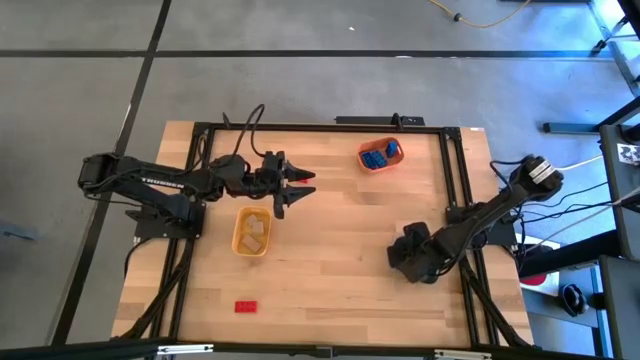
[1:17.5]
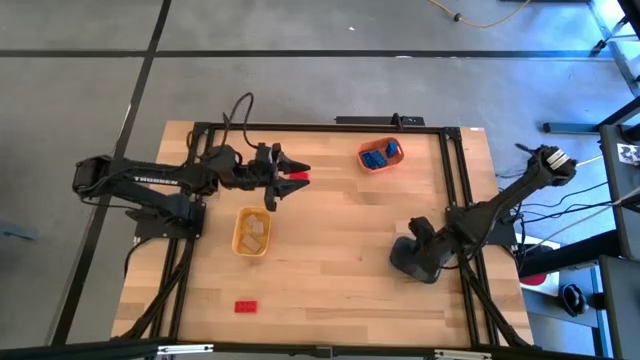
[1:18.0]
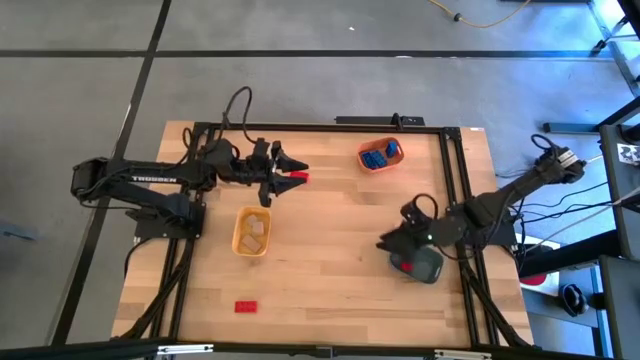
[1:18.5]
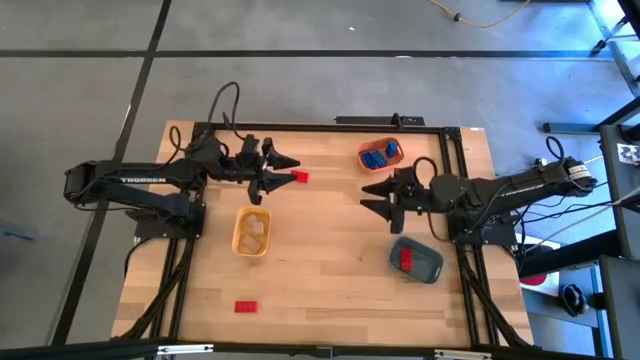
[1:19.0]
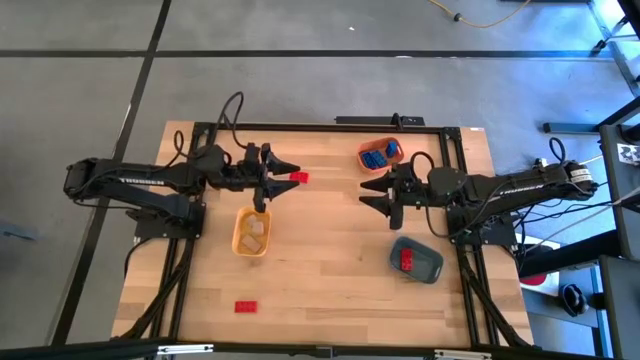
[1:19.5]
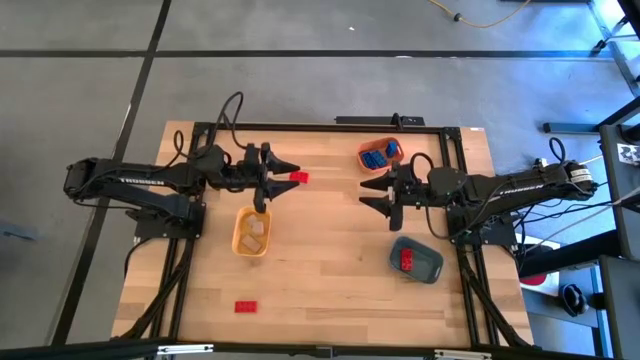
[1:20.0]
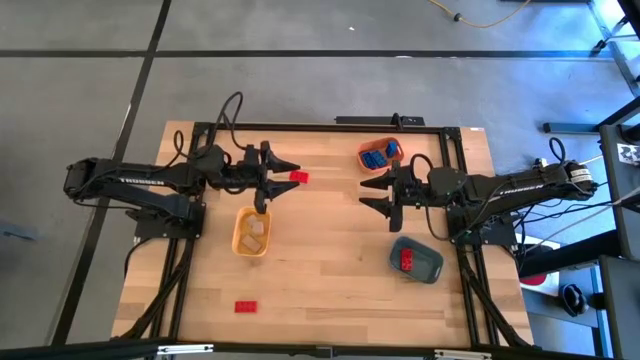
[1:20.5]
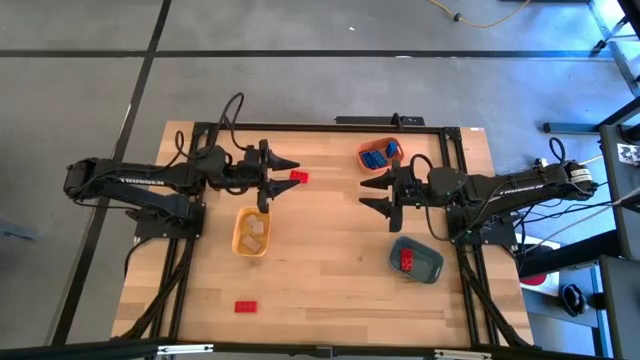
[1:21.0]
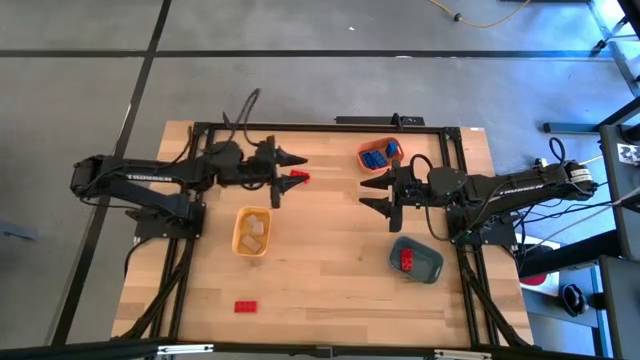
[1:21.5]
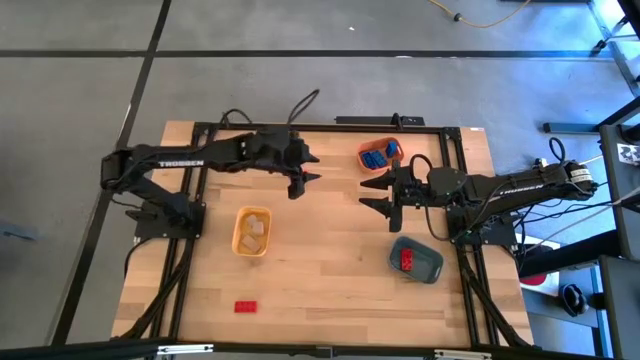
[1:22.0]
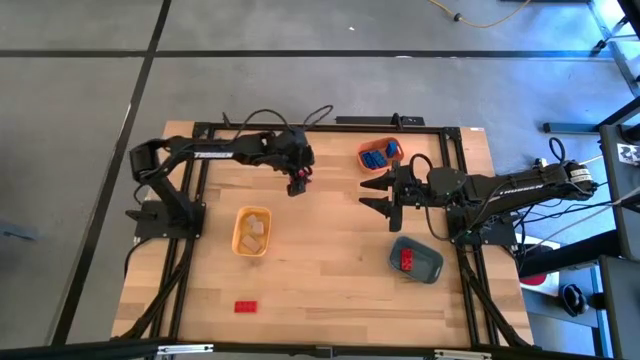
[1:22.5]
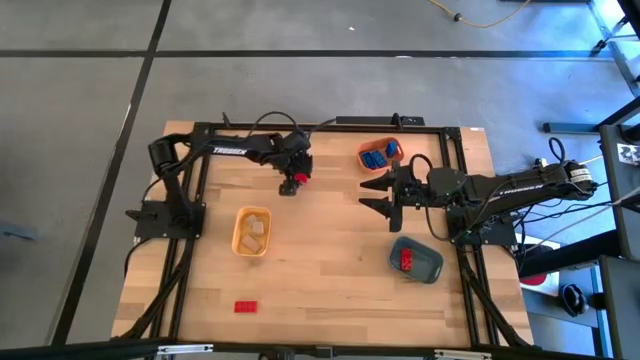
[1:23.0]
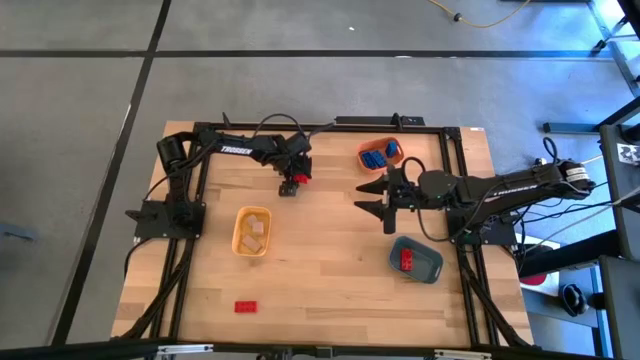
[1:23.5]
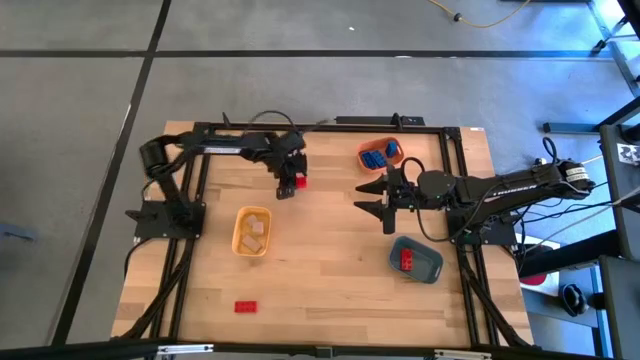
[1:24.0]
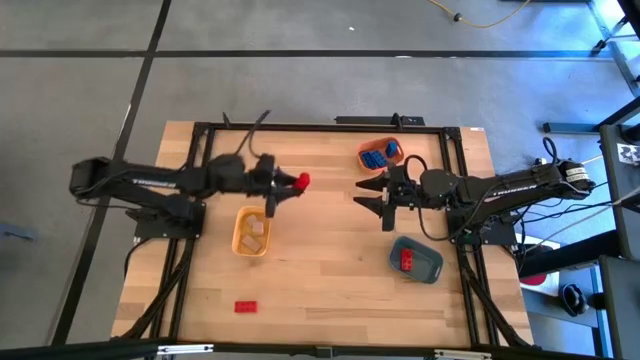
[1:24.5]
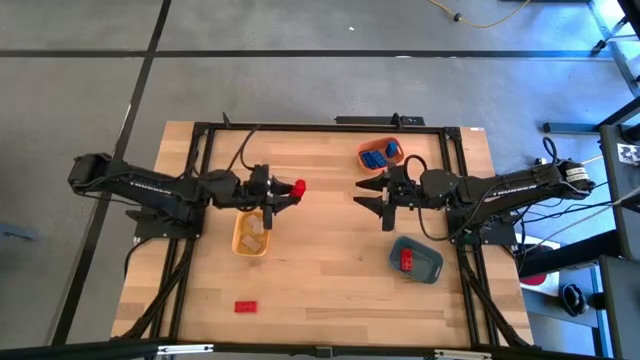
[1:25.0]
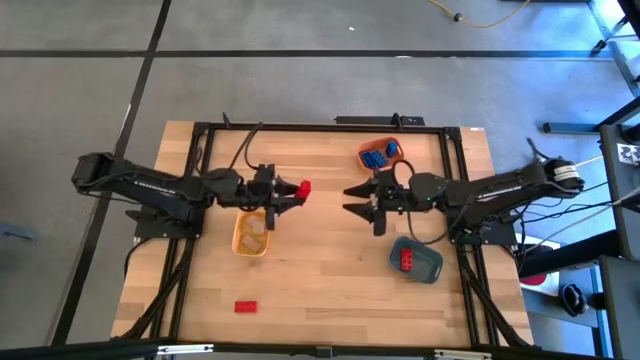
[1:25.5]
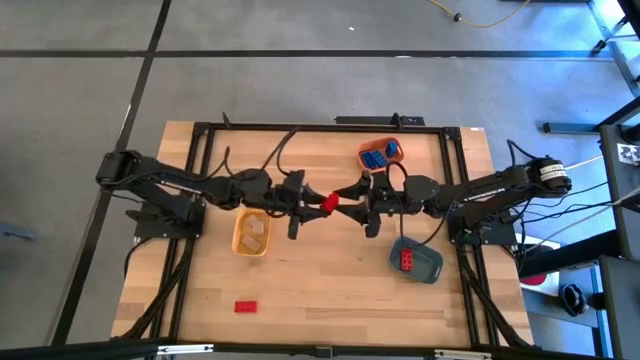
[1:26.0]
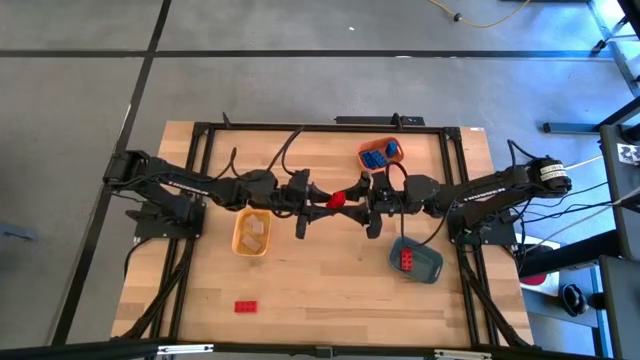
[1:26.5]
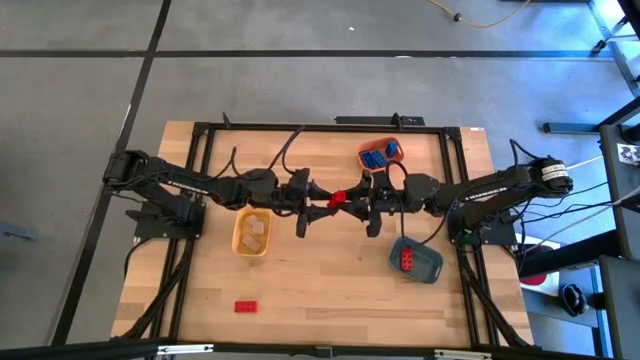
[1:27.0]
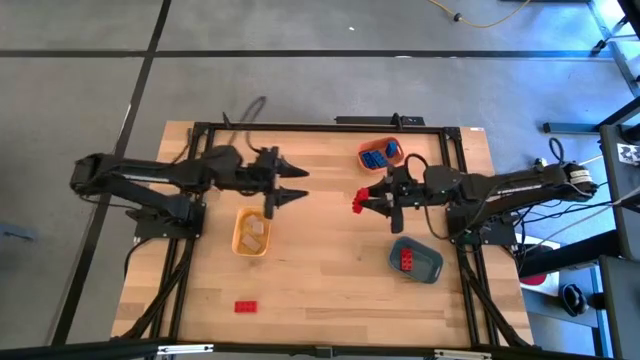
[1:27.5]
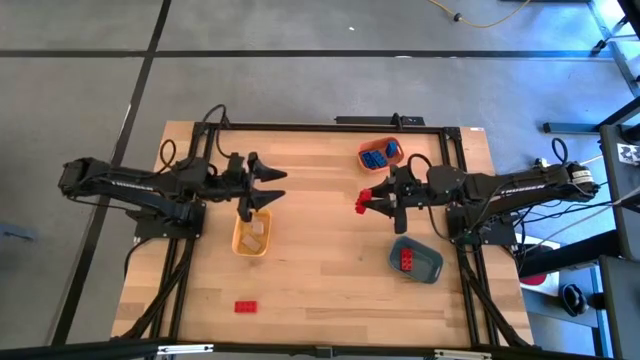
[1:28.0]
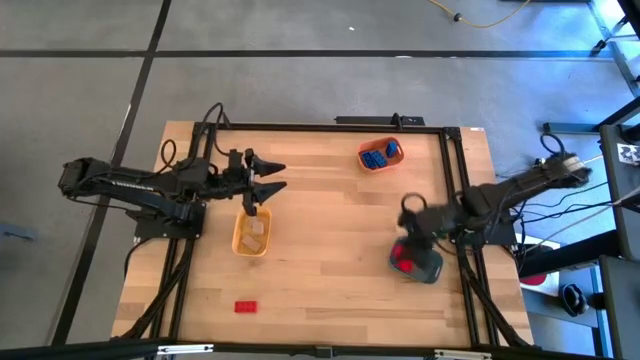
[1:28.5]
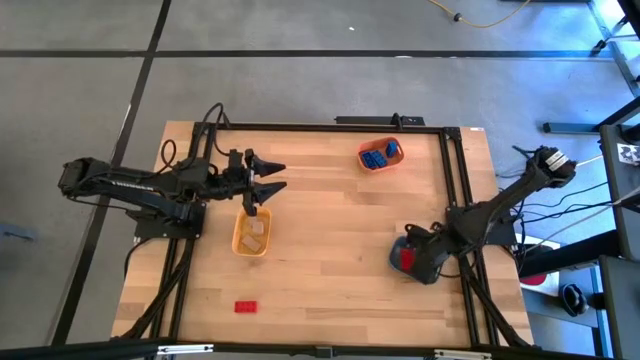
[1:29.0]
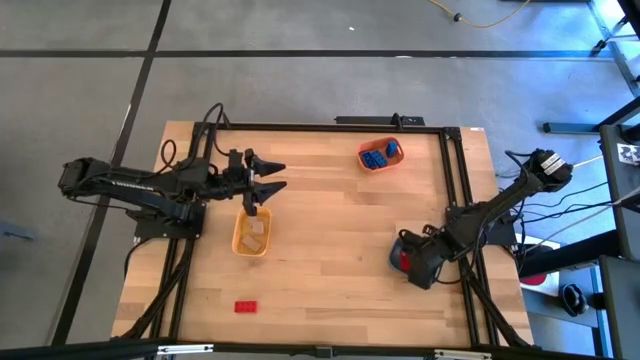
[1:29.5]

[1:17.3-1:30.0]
Task: Sort & place blocks by color
Put the top red game piece into the blue bin

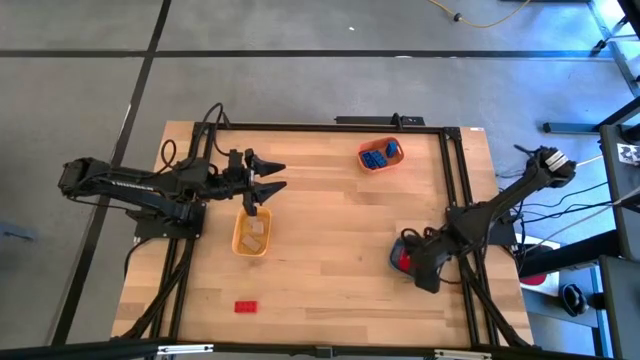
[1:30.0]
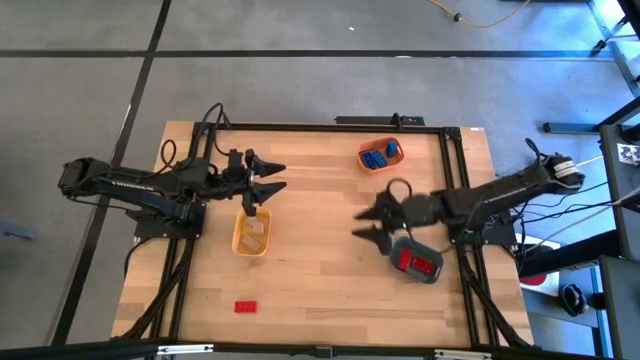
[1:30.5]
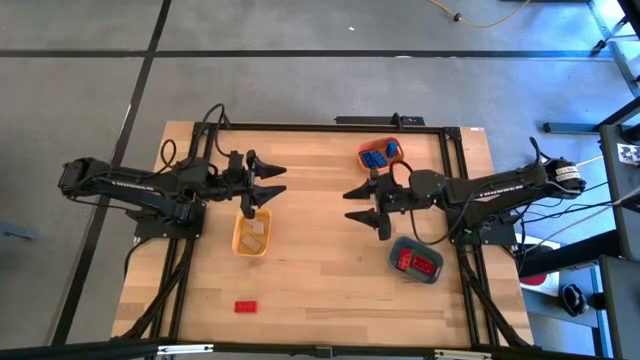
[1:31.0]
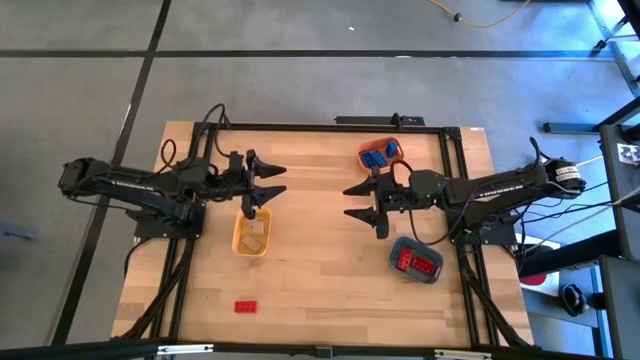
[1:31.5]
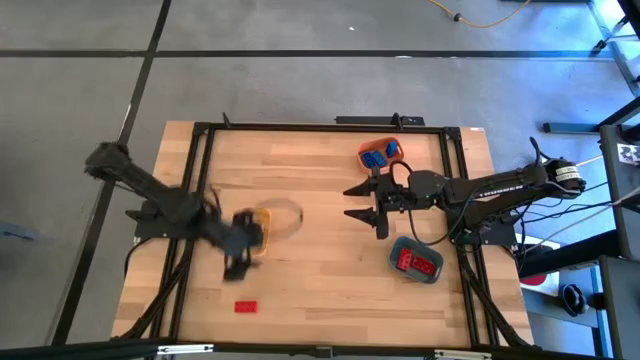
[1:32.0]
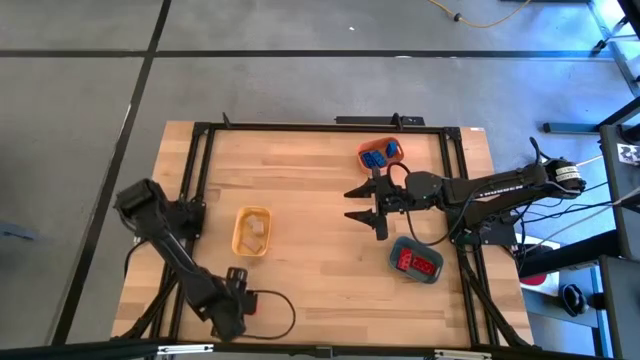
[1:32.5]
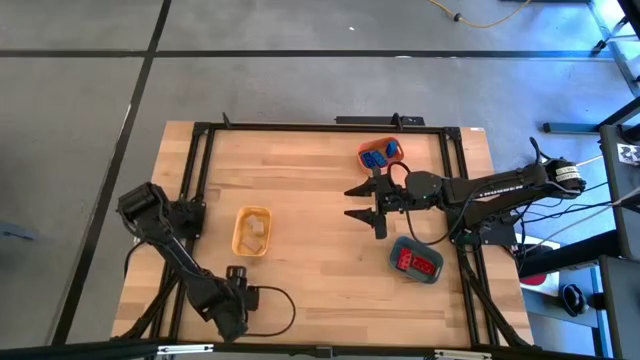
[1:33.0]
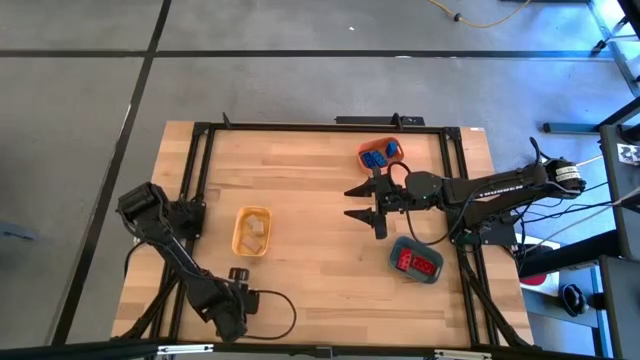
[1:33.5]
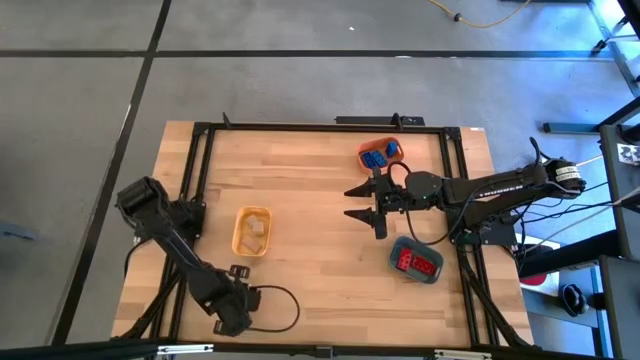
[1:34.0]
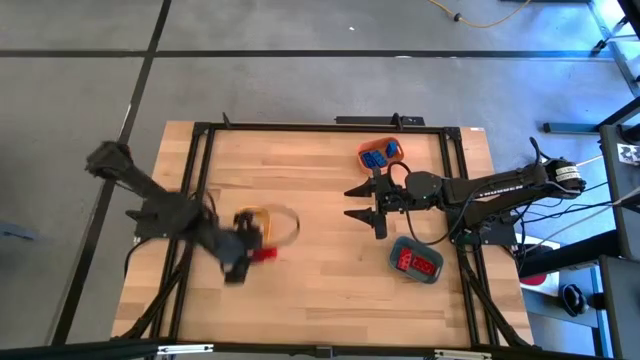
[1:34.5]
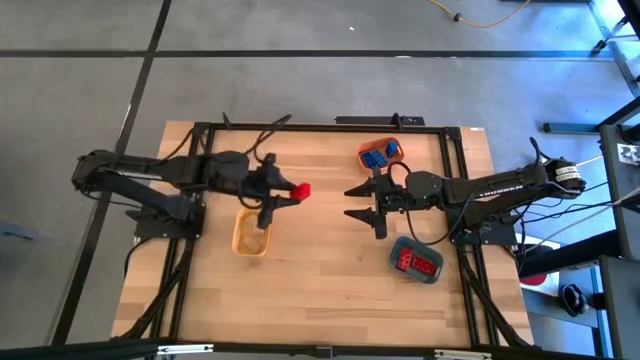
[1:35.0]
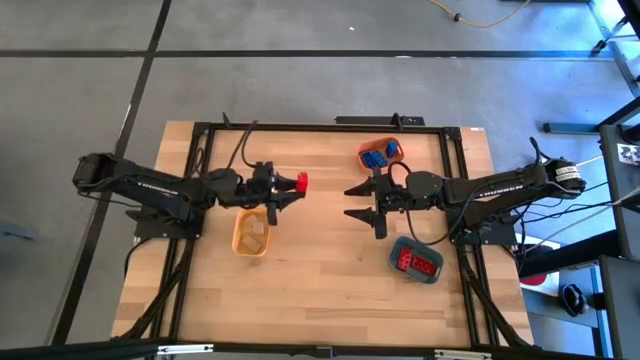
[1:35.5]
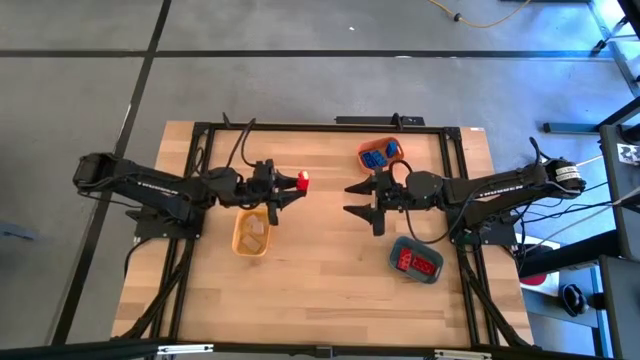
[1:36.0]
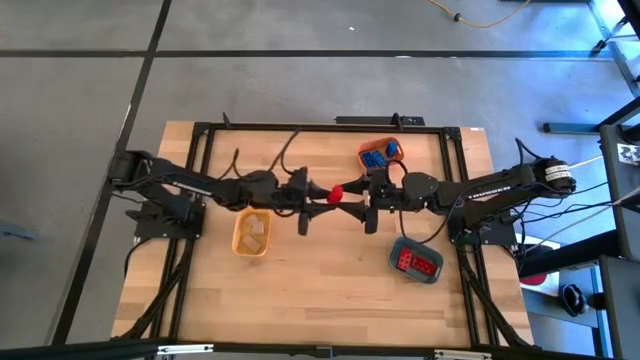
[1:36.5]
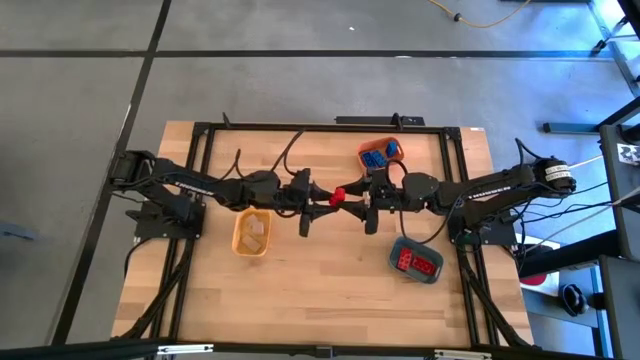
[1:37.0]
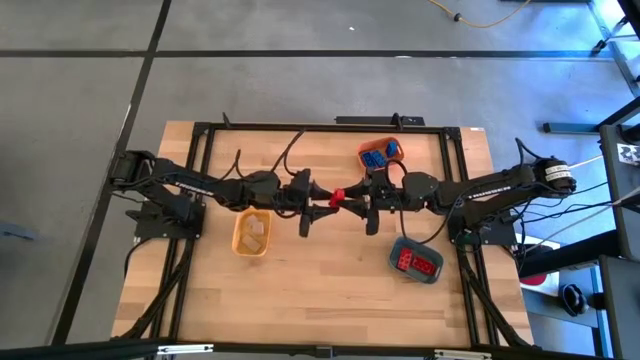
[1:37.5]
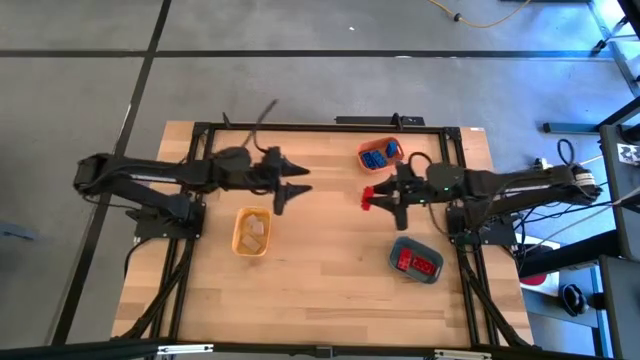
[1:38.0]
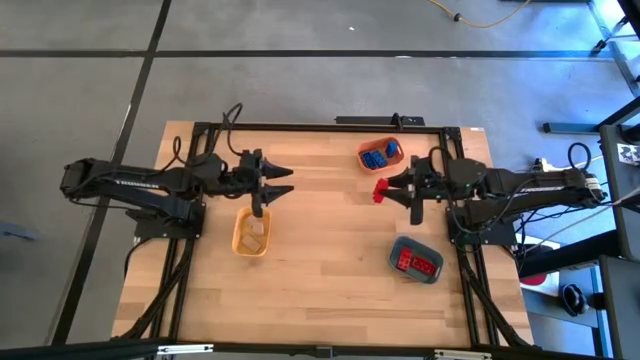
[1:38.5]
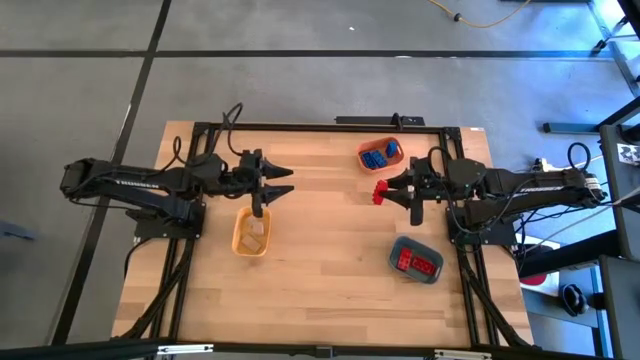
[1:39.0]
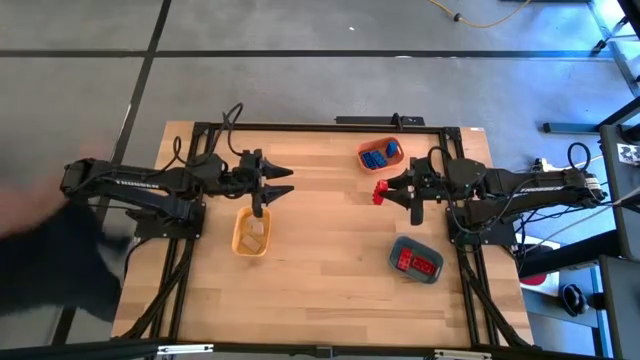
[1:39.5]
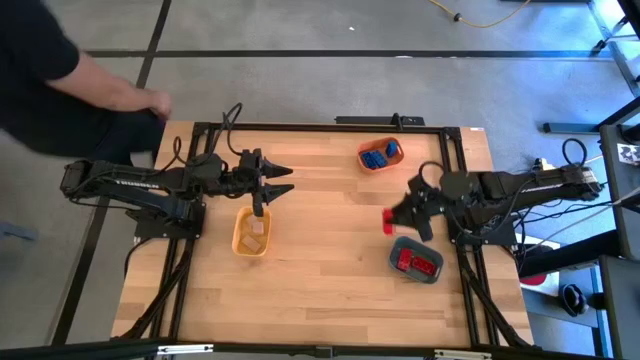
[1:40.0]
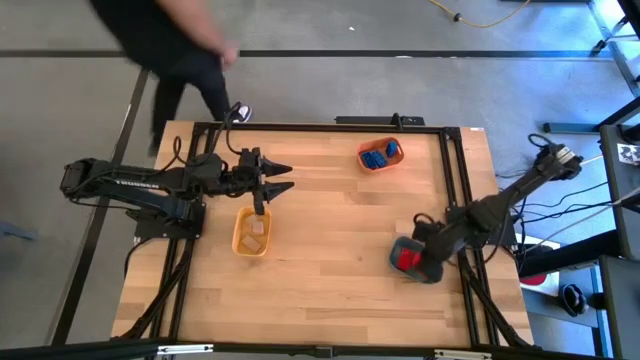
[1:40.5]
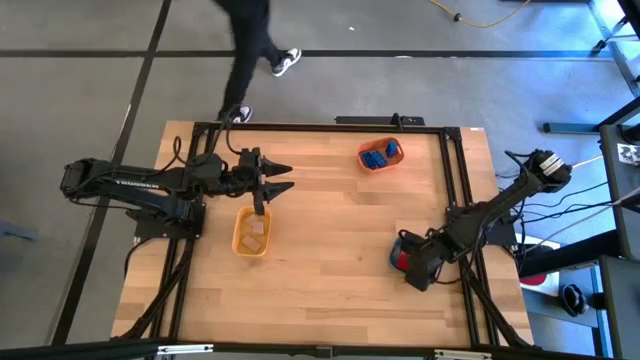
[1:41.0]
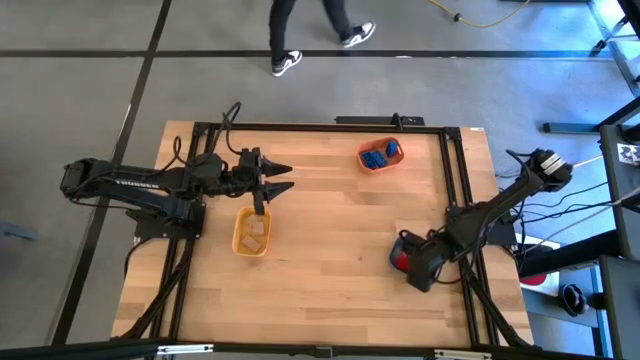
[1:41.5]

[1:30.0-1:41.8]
Put the red game piece into the blue bin
